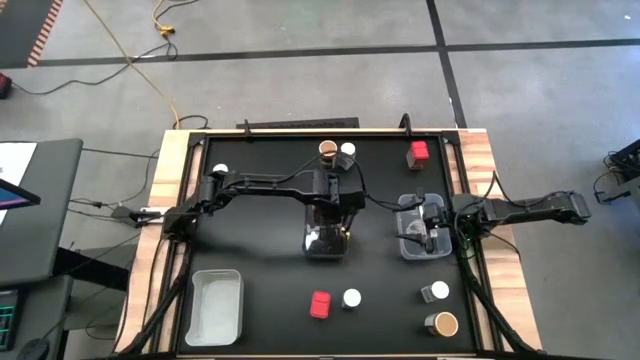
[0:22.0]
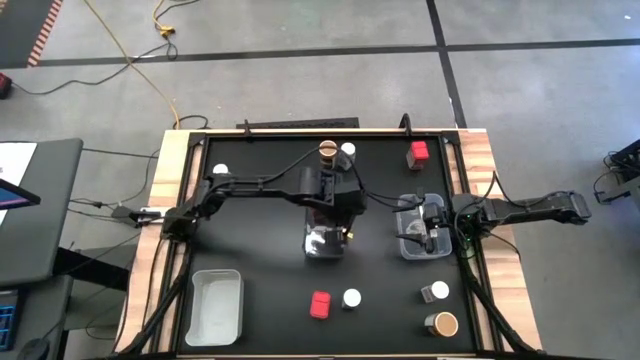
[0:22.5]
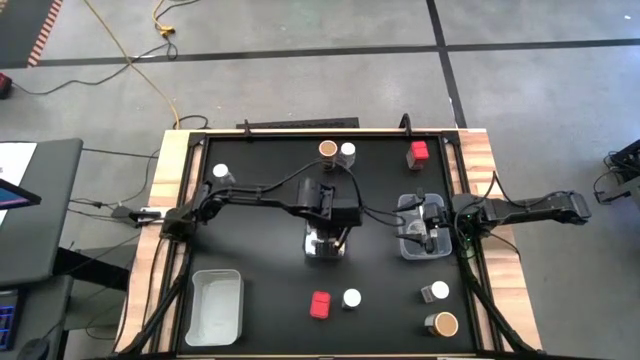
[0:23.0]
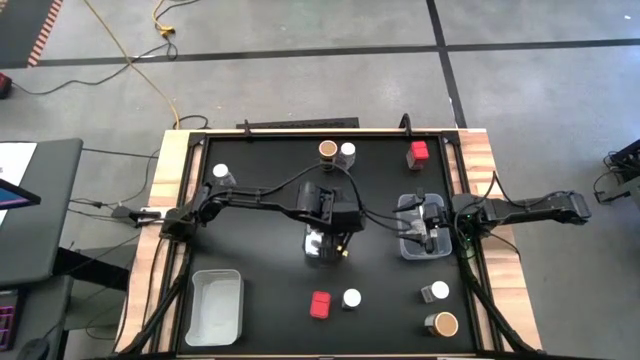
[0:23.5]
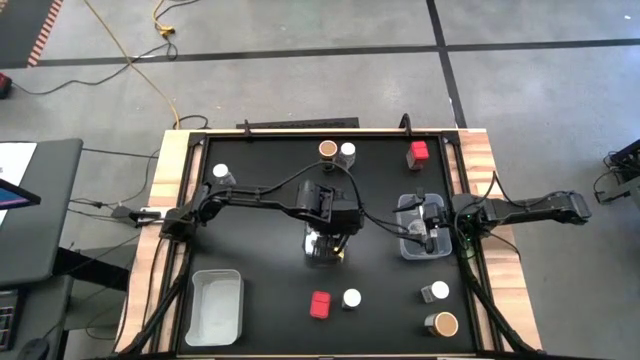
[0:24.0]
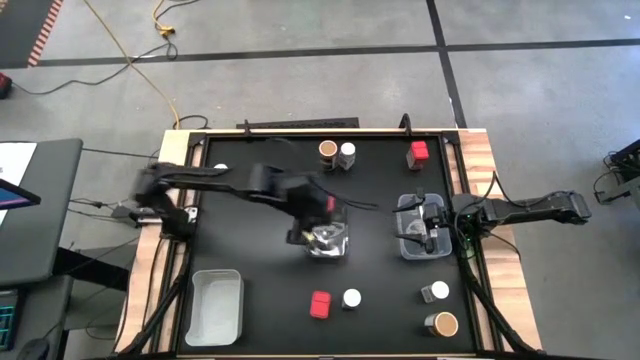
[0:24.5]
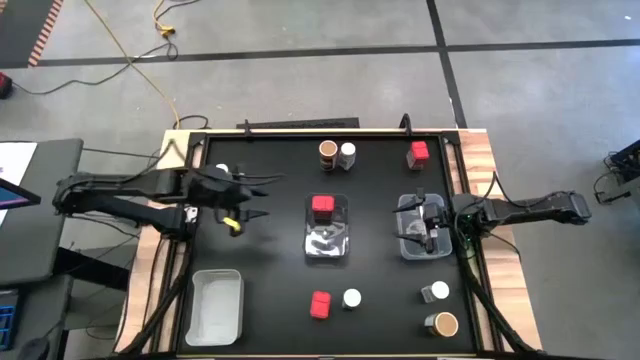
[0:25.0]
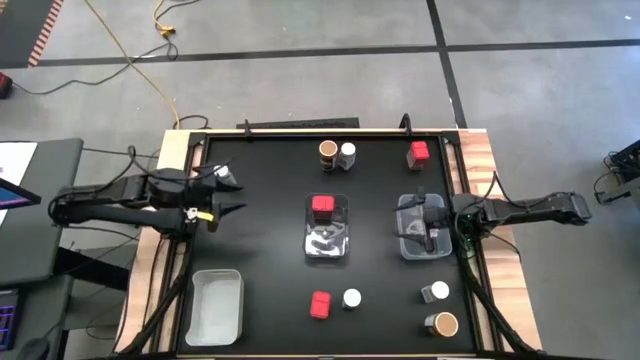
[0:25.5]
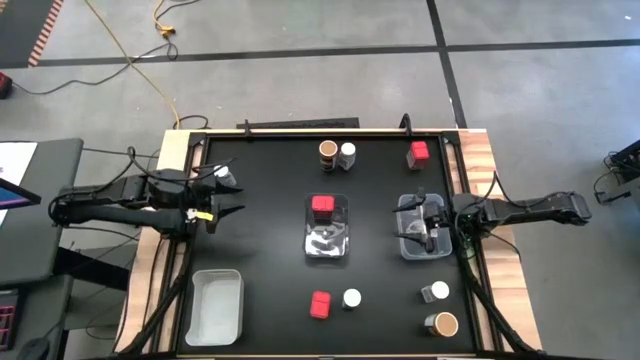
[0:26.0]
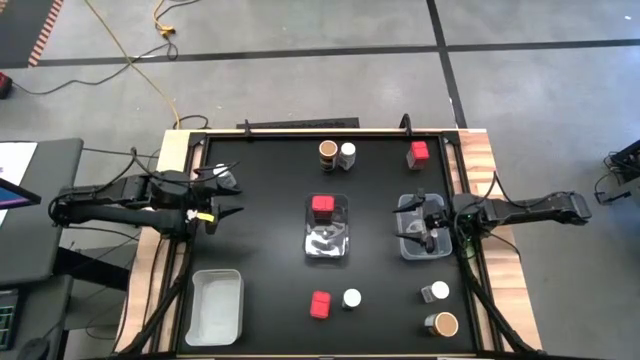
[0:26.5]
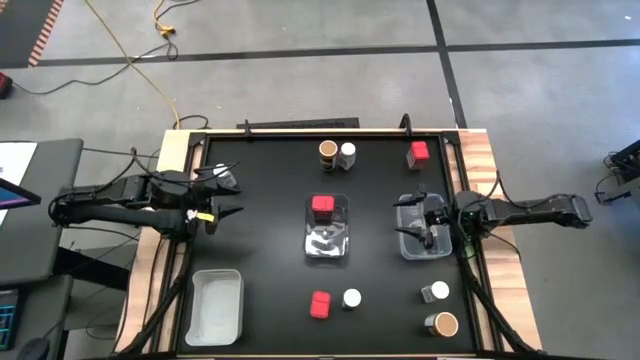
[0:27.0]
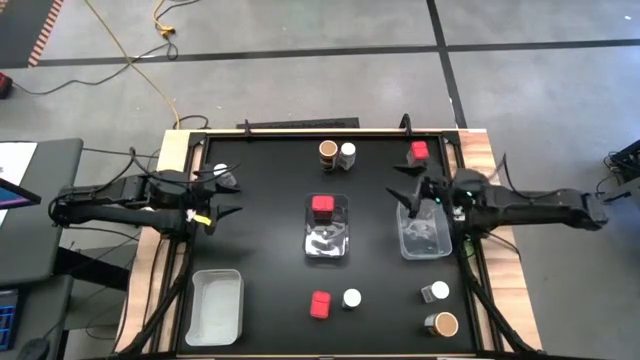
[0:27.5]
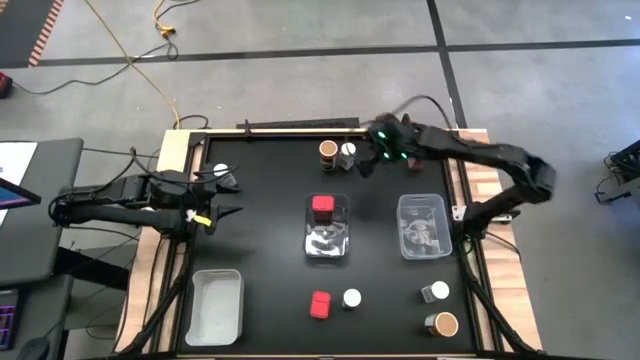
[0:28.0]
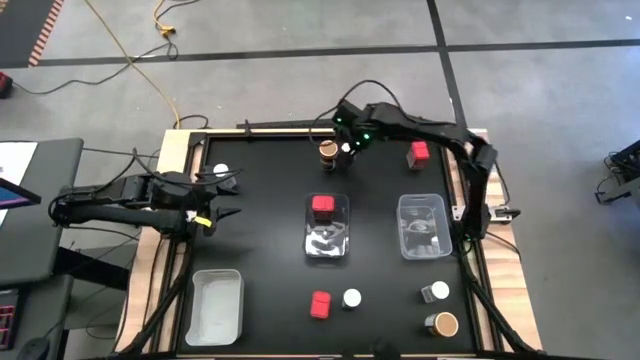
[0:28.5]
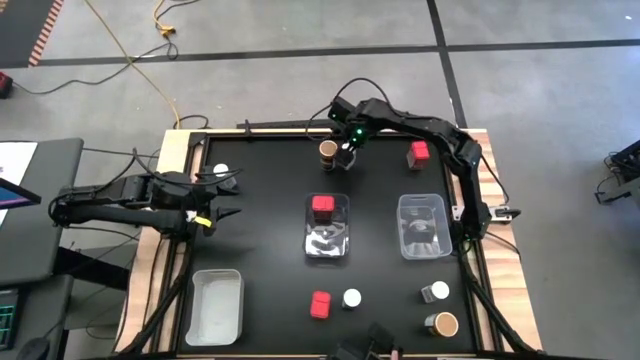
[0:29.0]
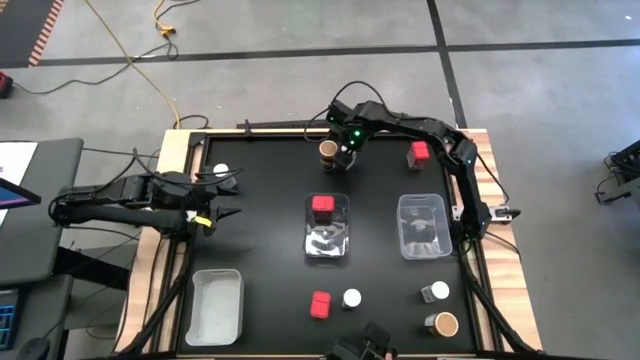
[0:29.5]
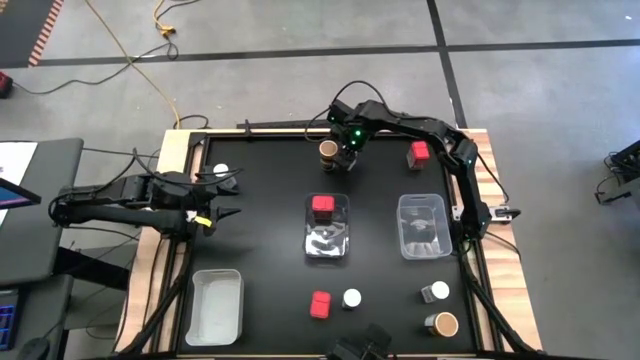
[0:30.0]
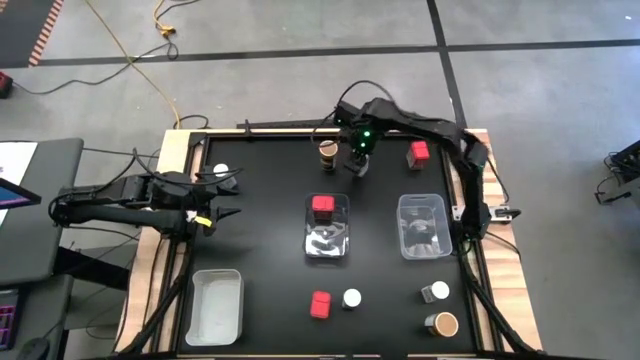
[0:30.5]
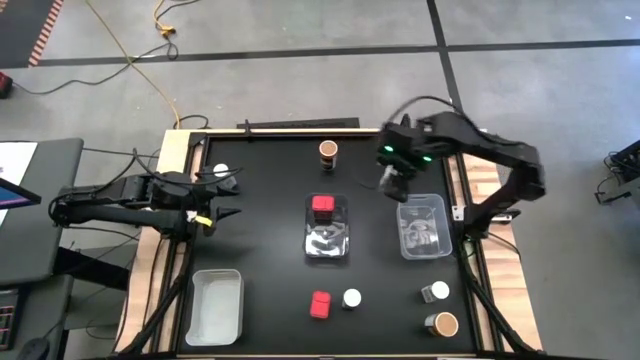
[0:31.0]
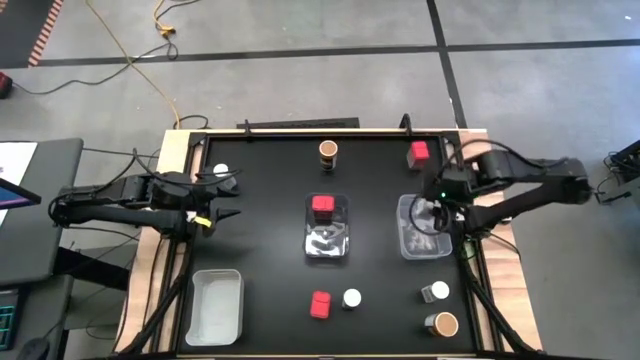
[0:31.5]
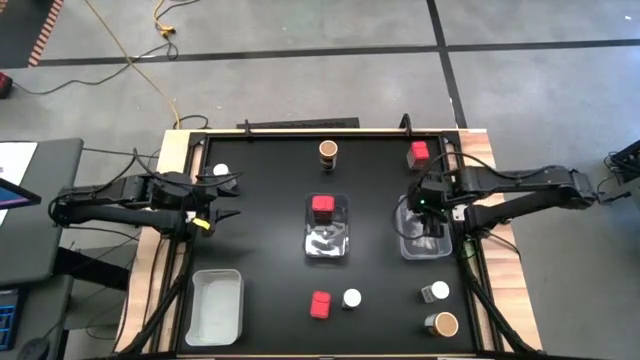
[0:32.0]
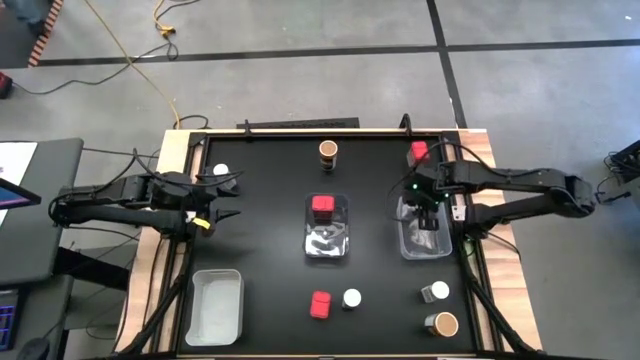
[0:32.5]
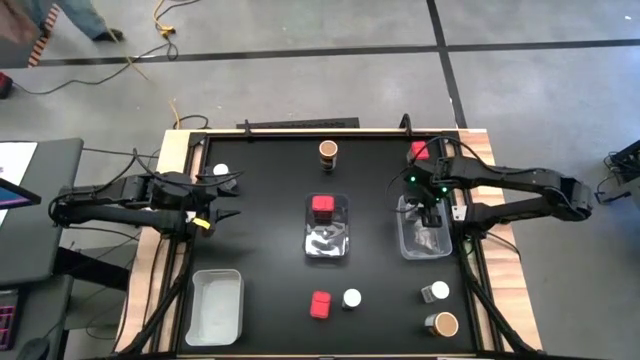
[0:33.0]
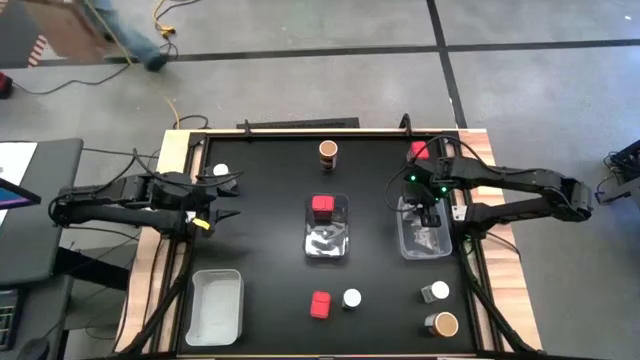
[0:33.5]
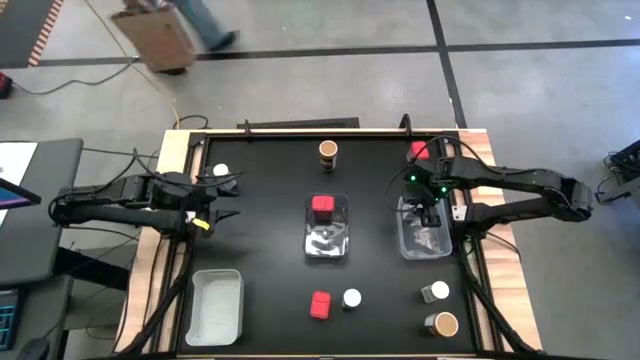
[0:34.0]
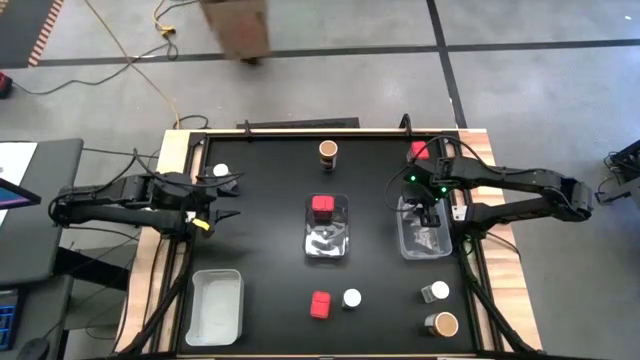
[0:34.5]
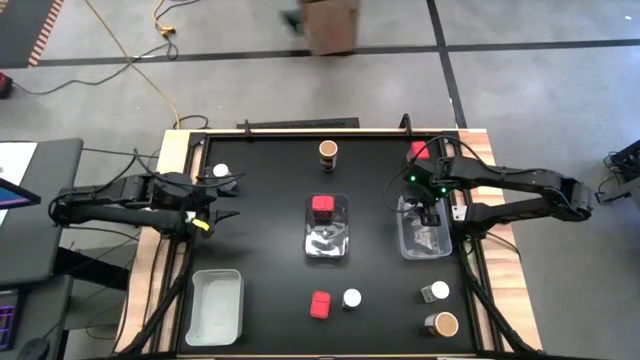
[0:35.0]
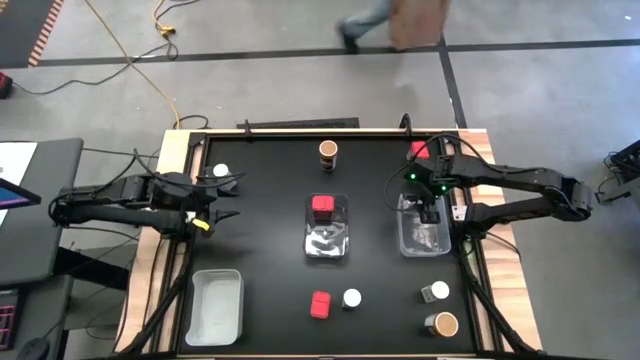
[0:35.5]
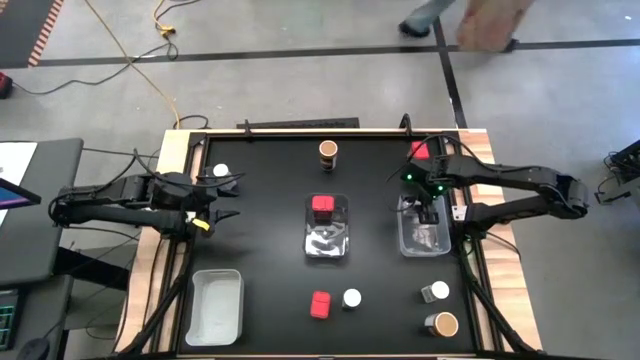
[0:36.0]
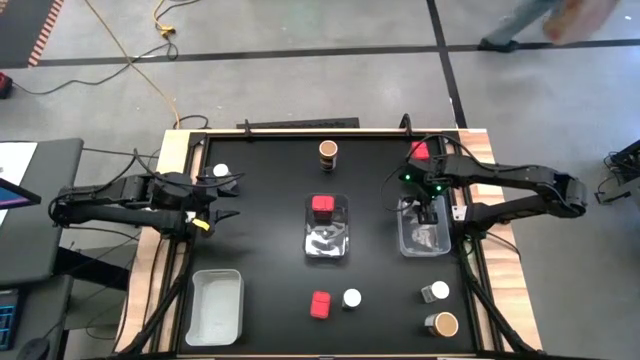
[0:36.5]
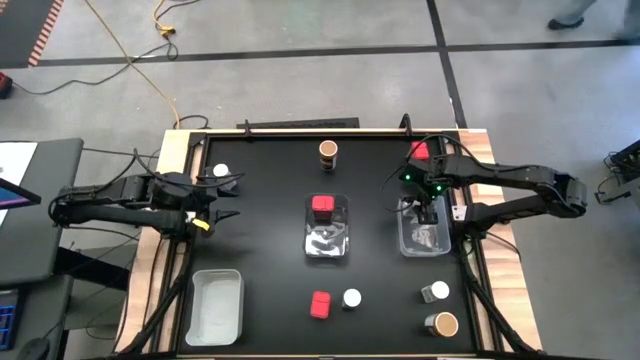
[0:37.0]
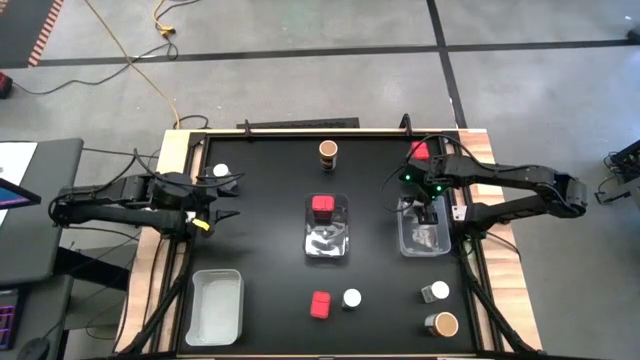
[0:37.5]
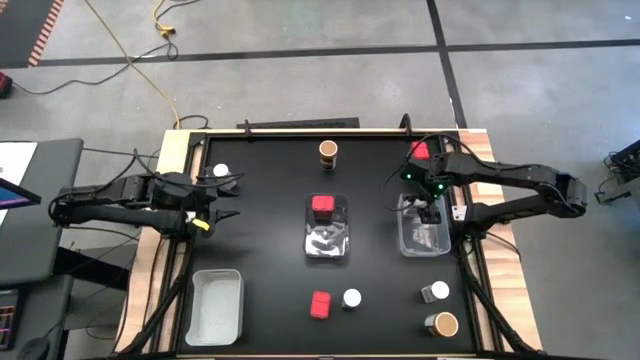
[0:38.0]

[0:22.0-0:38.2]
Task: Sort spices by type
Put the white seasoning bottle into the transparent bin

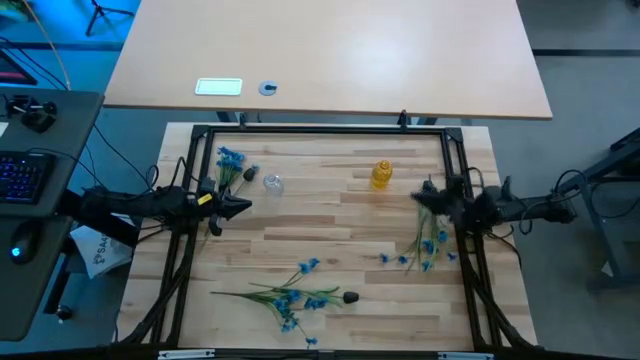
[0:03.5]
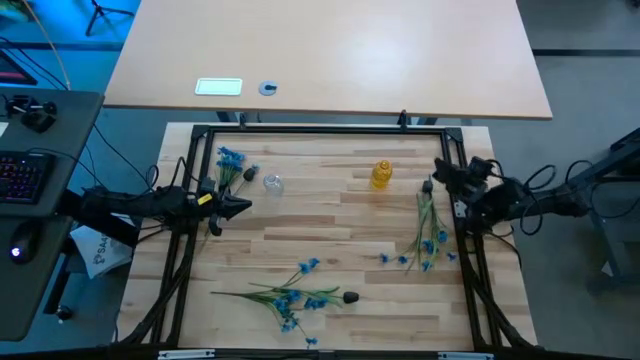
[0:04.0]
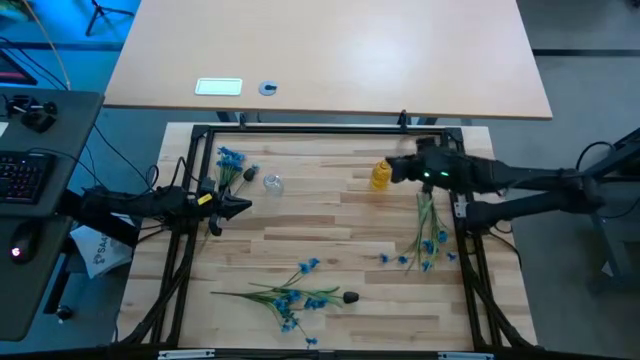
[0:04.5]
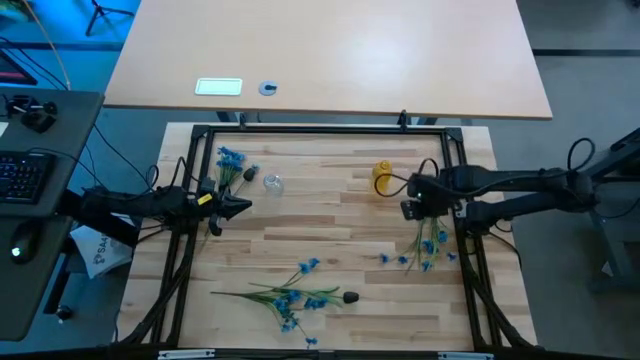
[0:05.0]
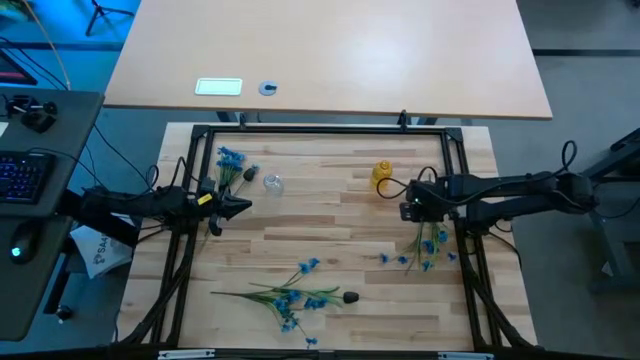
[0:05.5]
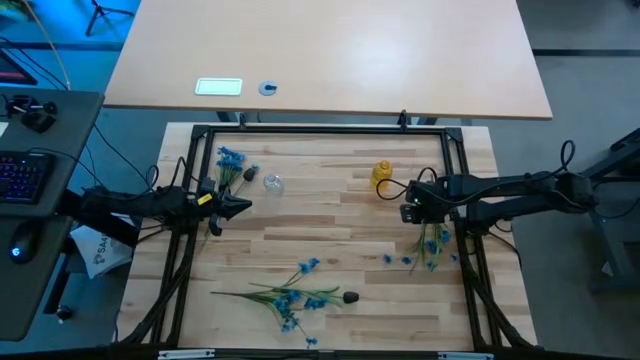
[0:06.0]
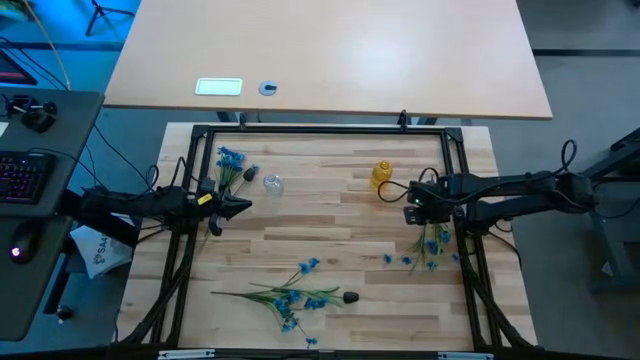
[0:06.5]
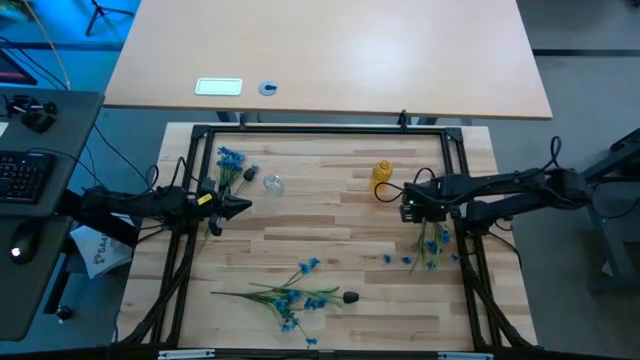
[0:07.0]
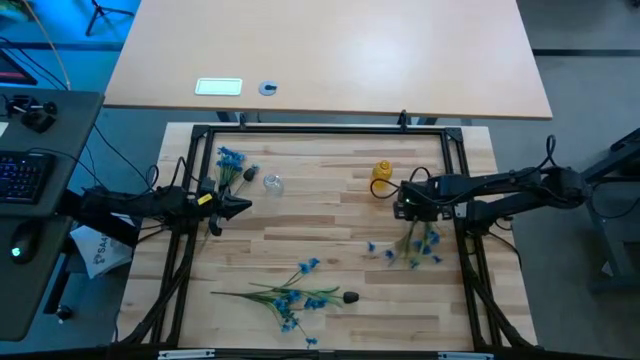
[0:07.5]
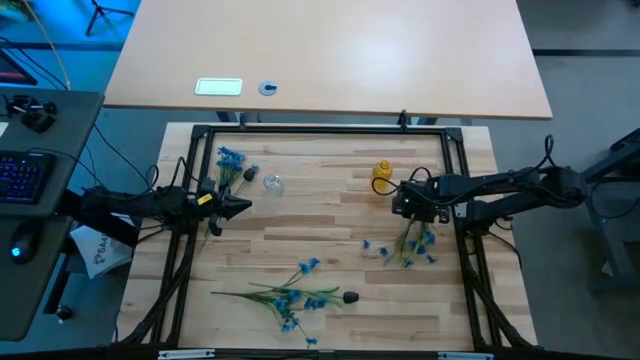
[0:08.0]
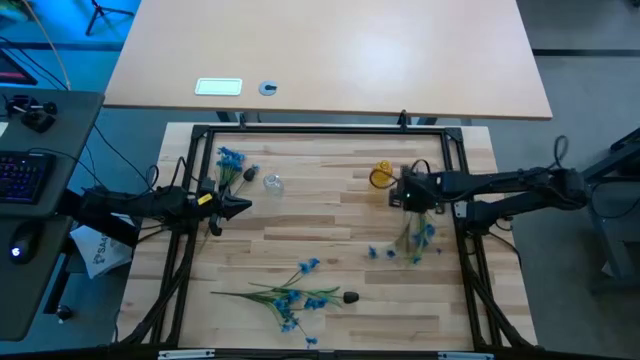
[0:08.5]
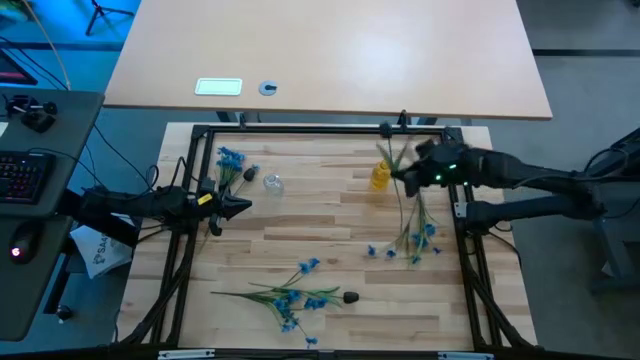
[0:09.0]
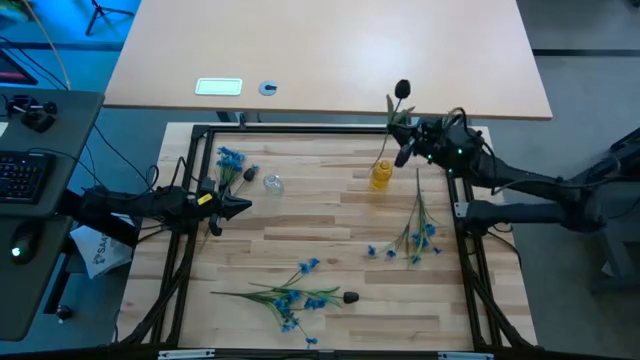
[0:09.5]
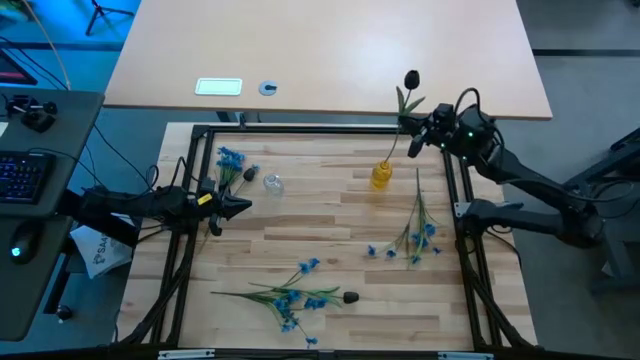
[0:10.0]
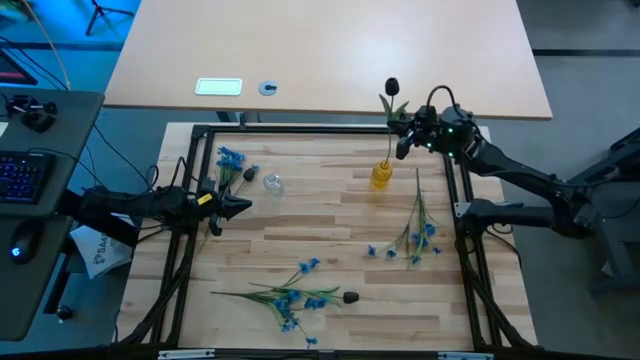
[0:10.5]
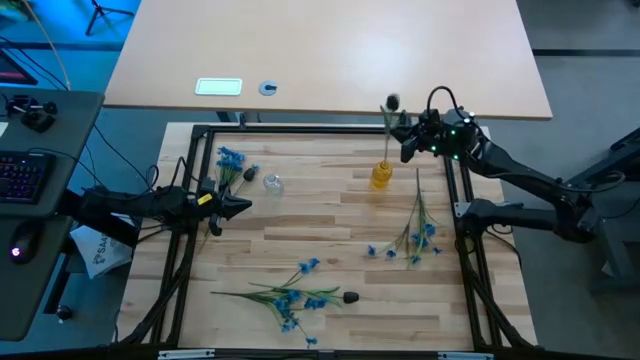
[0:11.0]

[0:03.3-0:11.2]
Task: Sort flowers into vase by color
Put the right black tulip flower into the yellow crystal vase
